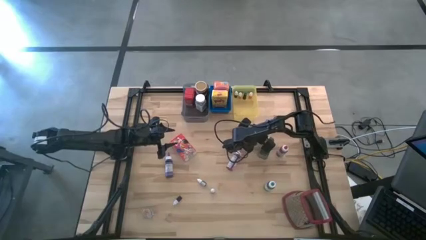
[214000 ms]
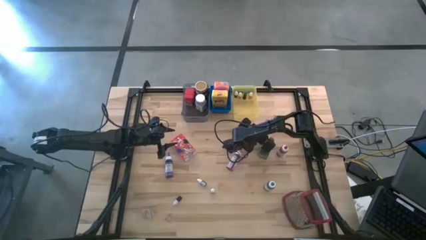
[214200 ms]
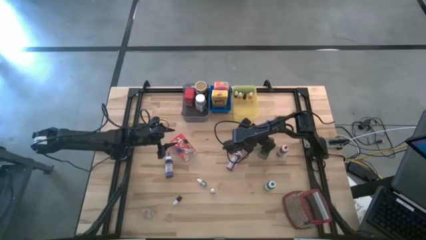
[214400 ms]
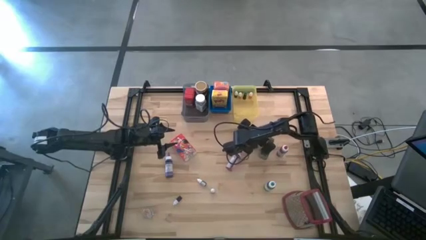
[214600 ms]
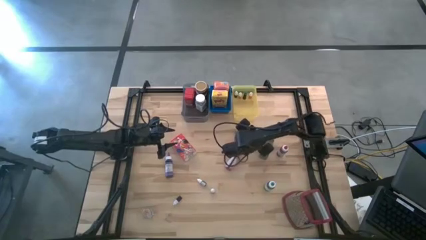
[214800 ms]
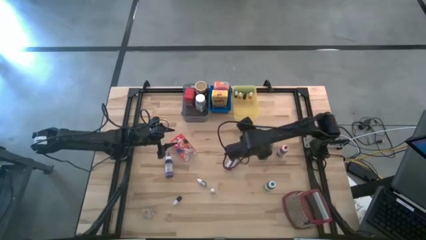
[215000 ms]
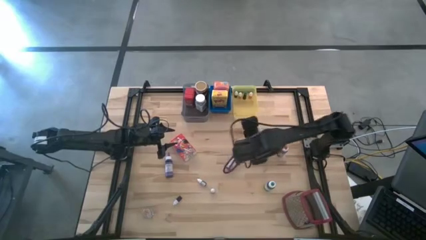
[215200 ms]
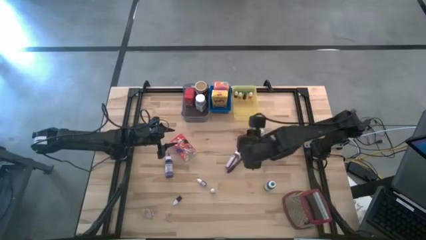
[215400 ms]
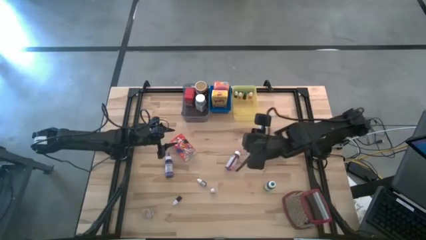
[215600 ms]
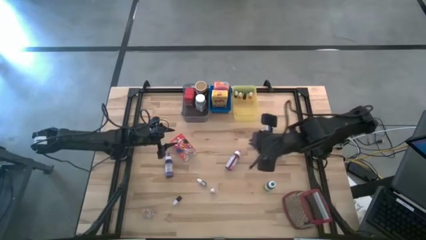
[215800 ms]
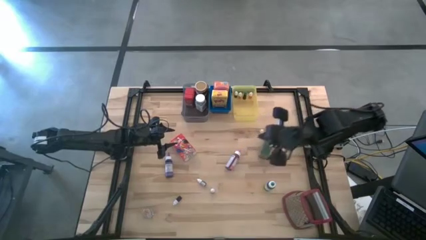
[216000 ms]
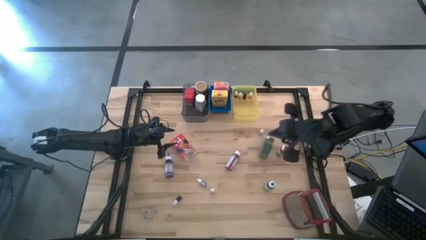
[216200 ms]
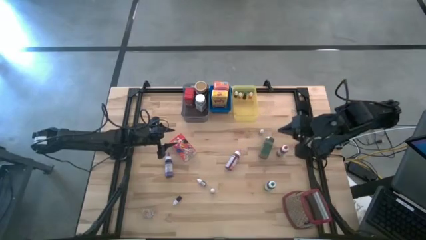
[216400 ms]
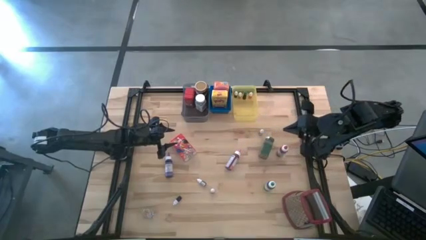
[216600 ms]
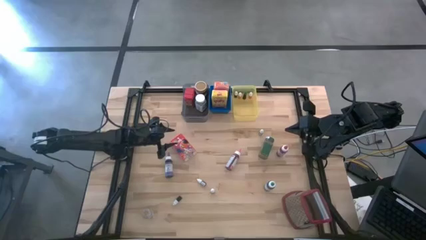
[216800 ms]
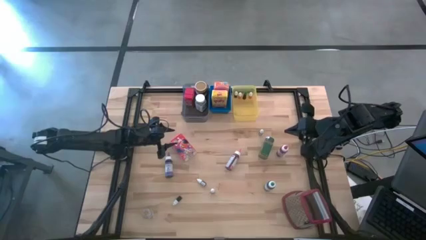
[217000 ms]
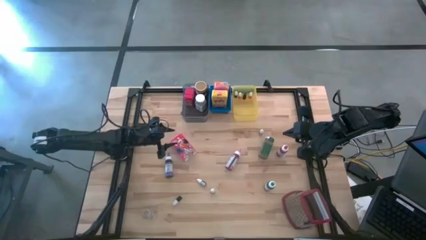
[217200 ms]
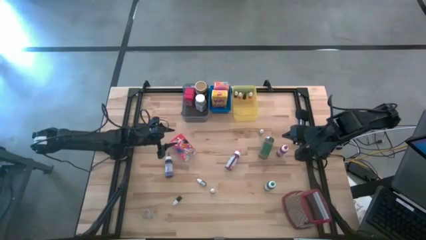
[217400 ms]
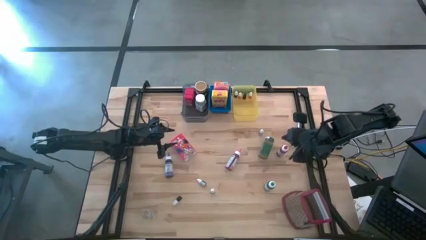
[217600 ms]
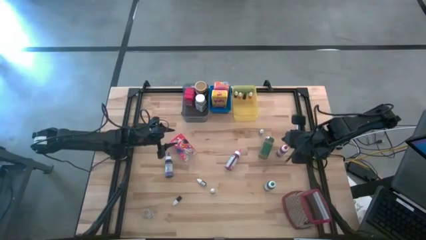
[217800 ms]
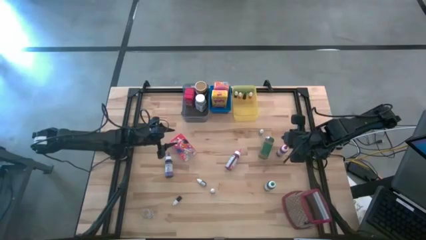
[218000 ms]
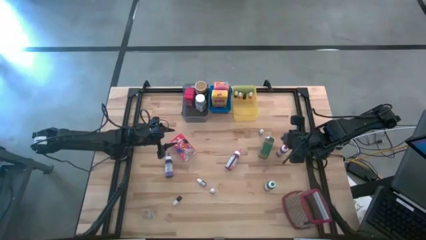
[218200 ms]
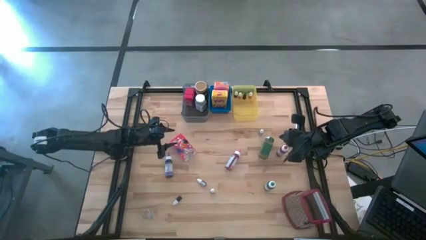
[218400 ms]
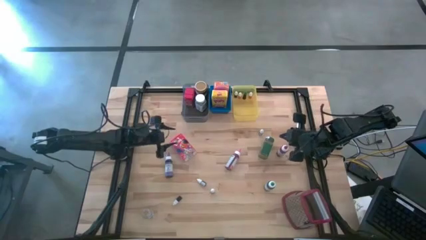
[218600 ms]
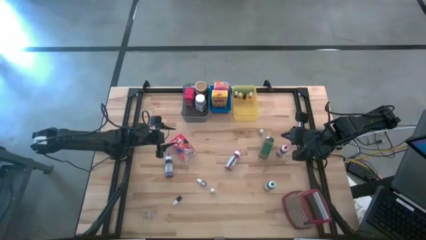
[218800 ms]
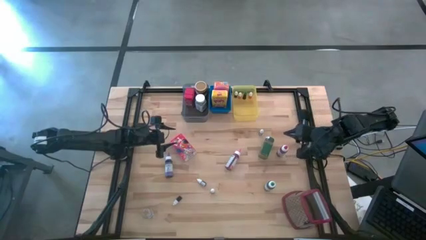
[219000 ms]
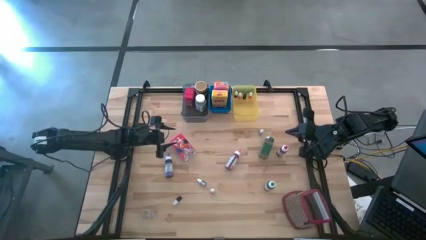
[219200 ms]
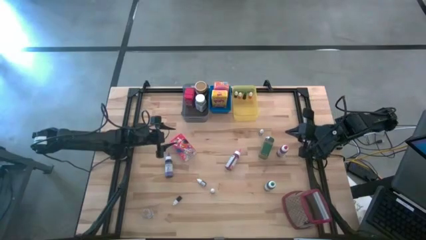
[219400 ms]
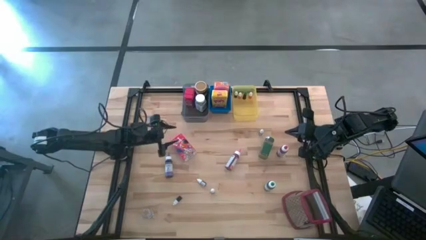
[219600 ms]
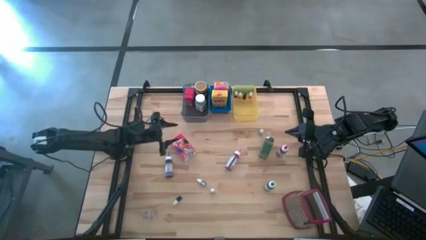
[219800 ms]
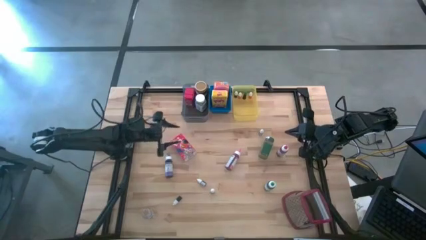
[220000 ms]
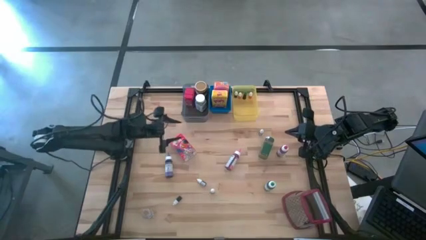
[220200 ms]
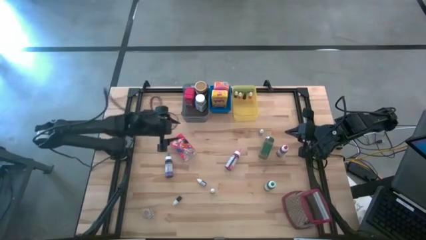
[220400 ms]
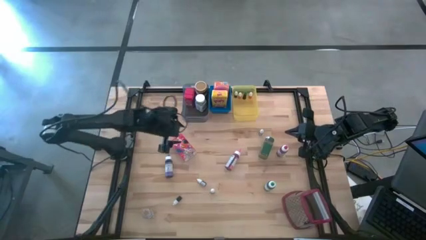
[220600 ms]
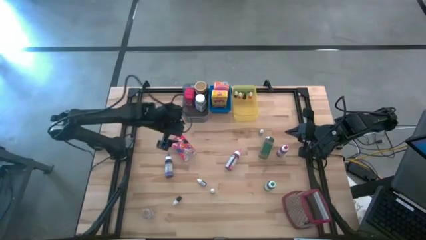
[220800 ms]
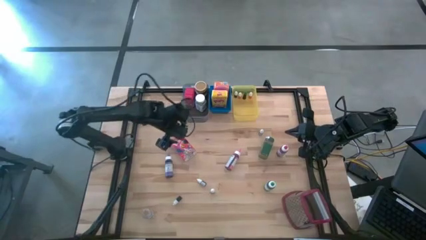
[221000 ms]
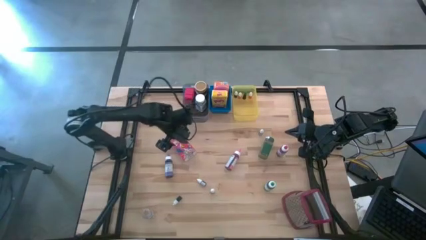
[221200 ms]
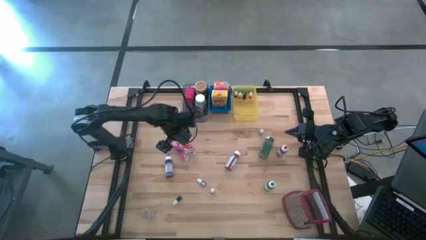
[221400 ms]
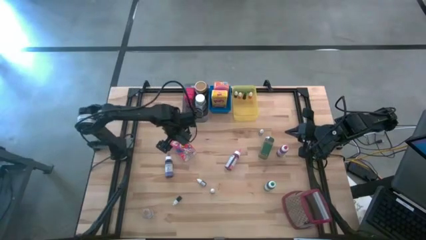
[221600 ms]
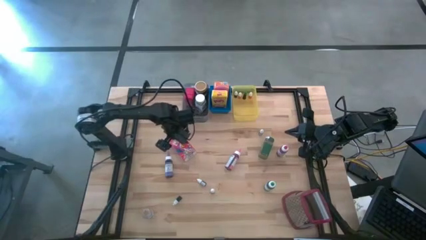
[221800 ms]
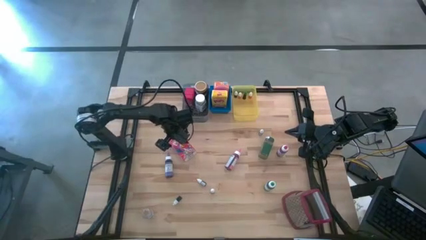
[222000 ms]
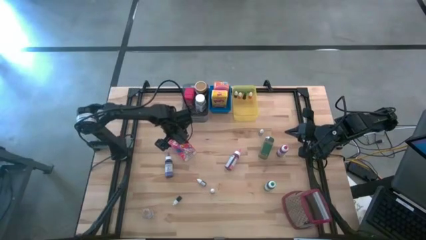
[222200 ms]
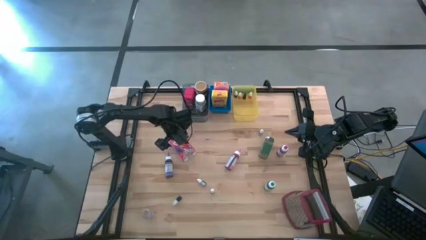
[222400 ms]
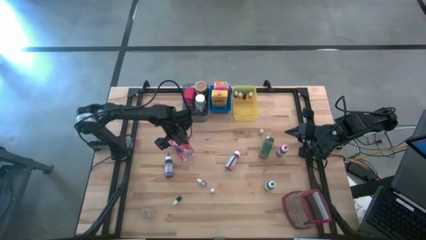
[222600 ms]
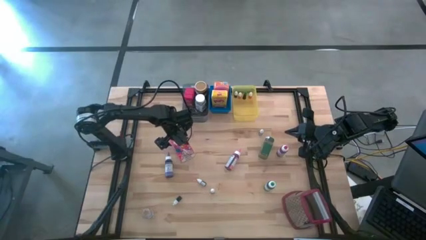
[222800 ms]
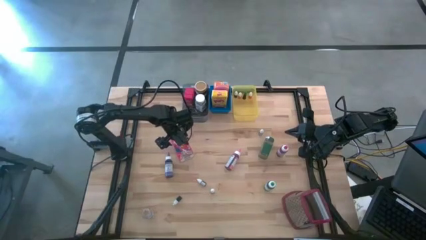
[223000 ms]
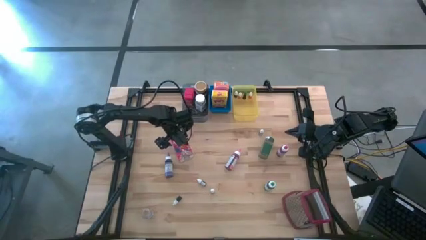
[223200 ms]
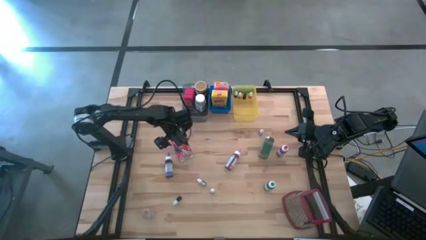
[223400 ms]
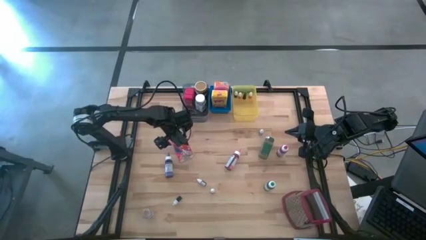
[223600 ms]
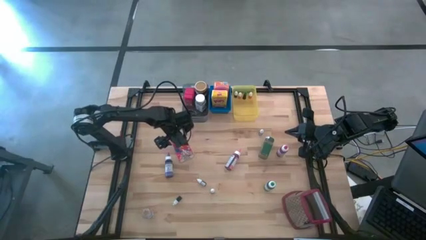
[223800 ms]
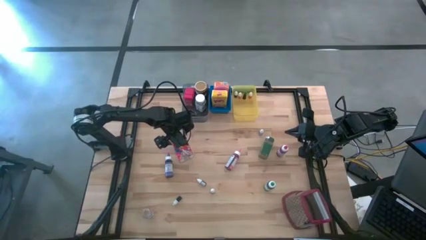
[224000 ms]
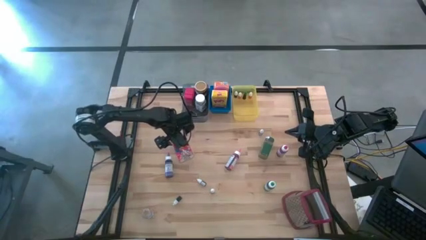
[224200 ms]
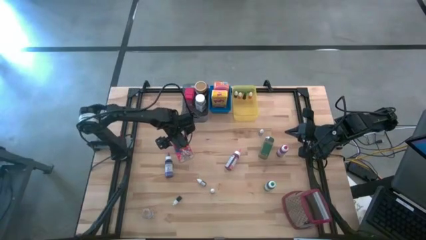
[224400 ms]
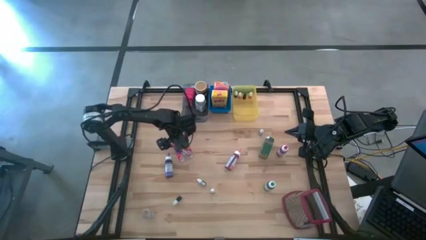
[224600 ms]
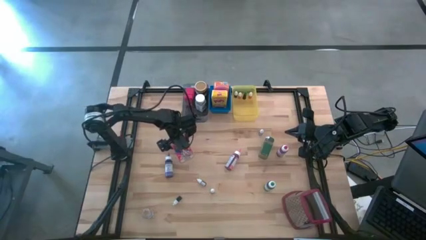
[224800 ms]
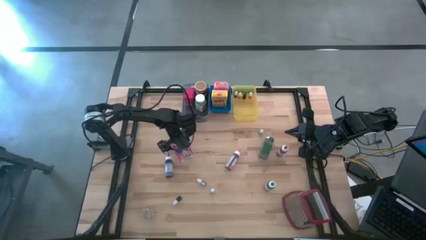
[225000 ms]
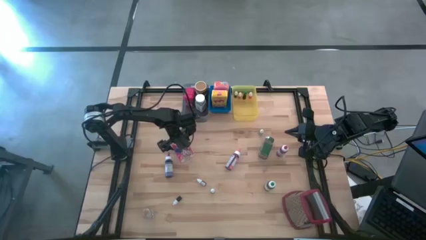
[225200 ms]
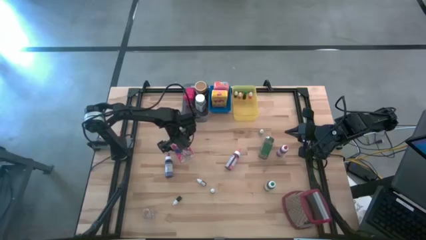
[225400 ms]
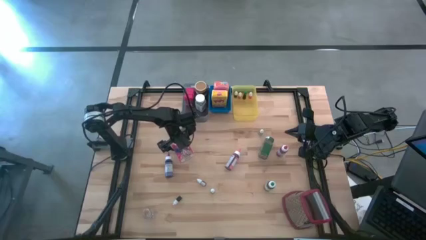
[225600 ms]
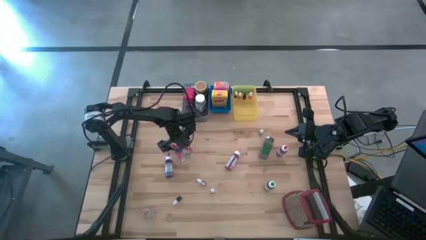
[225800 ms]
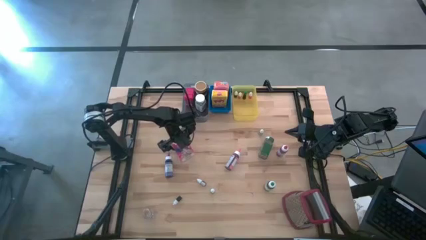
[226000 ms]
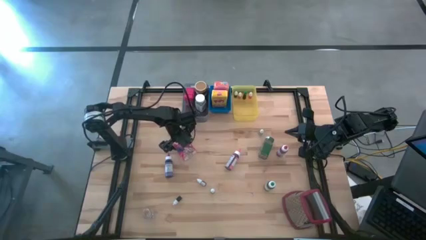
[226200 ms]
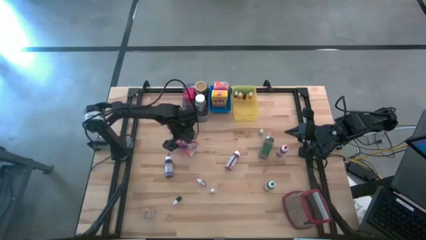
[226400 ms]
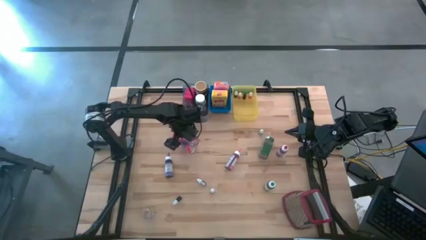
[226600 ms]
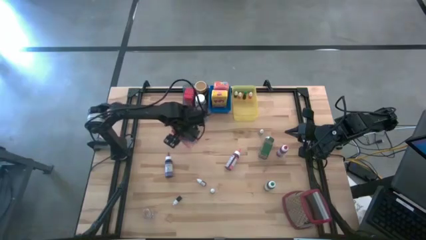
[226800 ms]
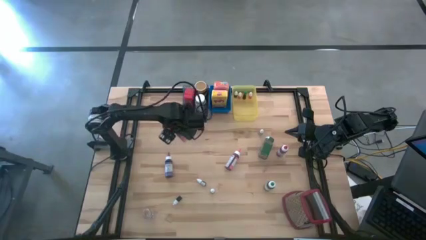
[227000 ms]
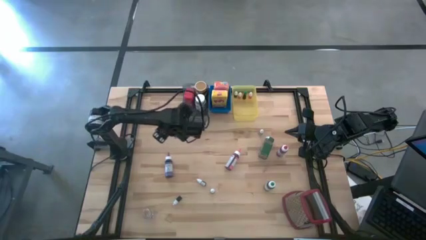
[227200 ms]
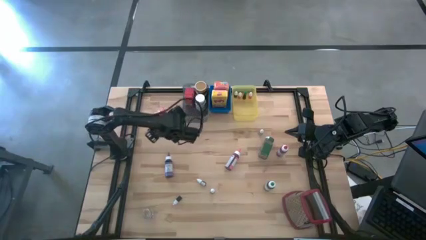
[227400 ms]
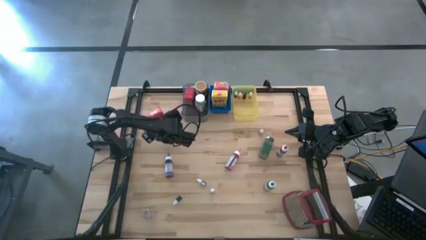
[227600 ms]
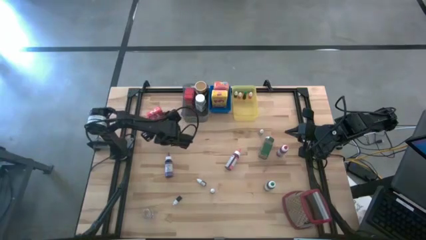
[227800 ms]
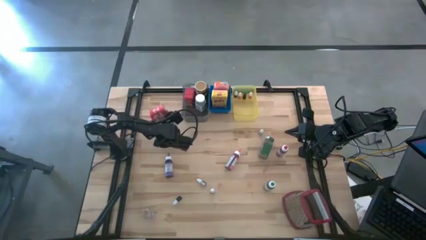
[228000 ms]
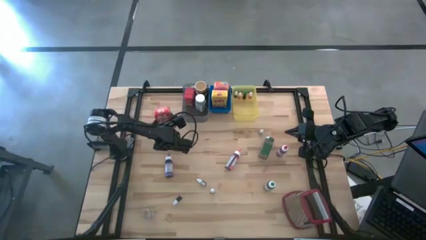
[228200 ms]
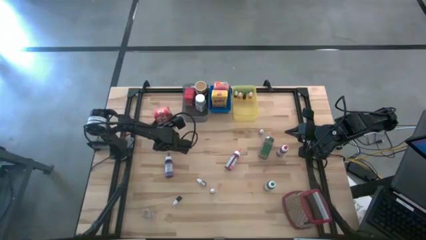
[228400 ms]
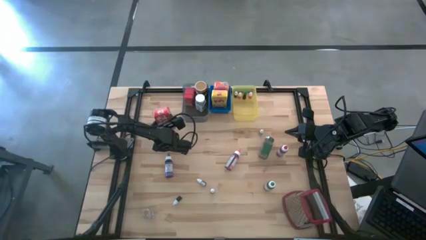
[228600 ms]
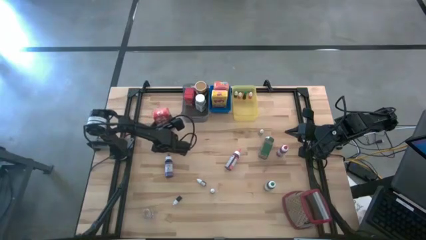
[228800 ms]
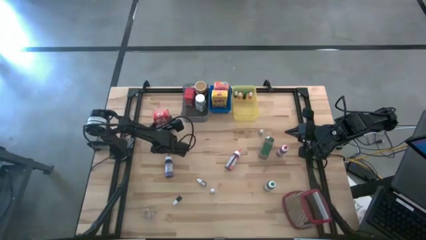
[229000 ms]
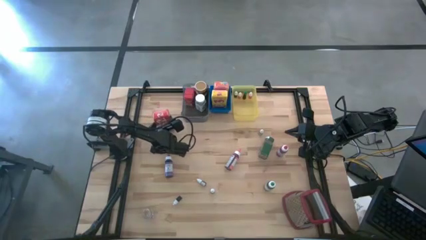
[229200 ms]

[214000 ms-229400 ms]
Task: Pick & Place Kitchen Items
Put the red cereal box into the blue bin

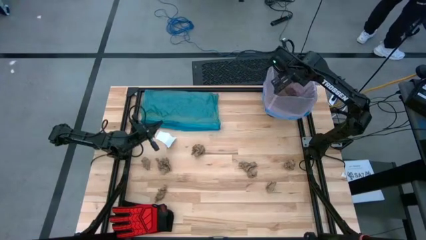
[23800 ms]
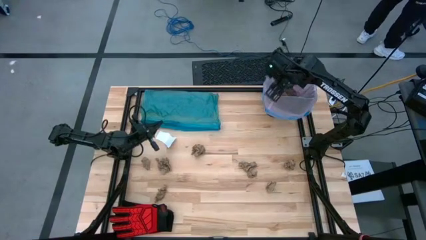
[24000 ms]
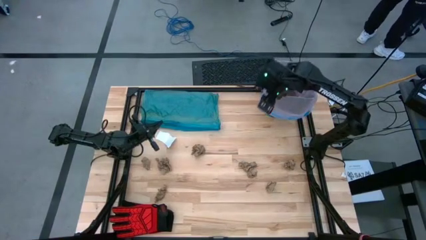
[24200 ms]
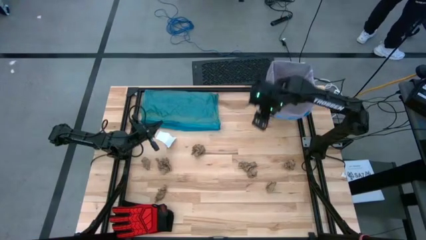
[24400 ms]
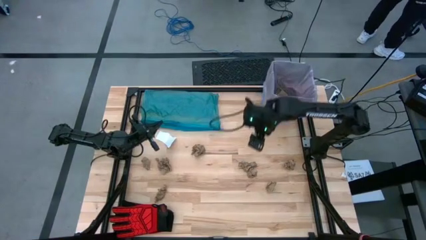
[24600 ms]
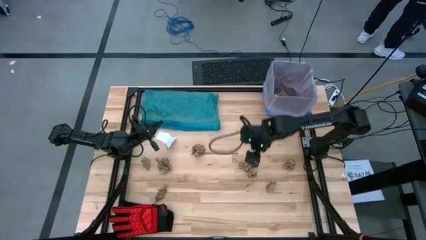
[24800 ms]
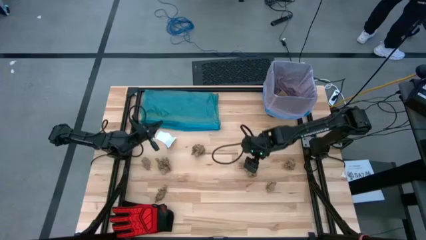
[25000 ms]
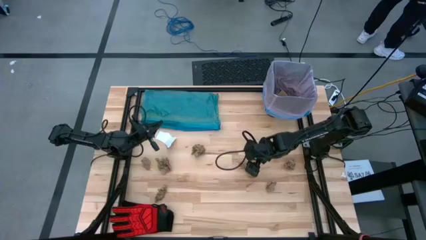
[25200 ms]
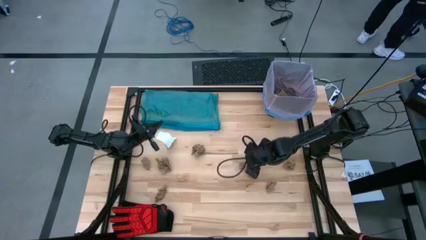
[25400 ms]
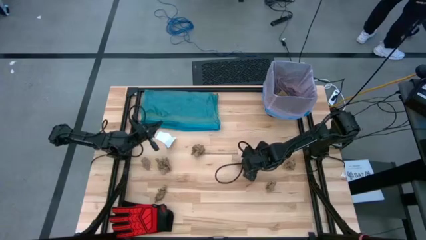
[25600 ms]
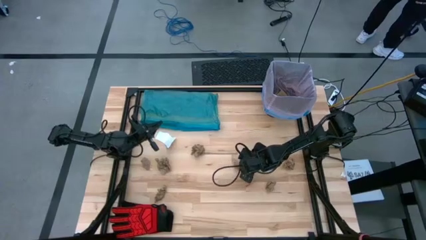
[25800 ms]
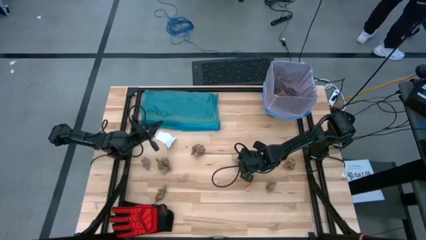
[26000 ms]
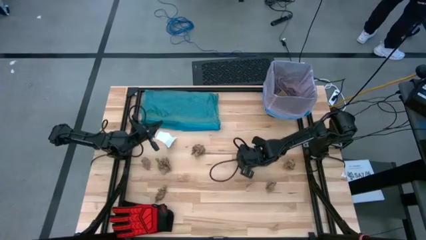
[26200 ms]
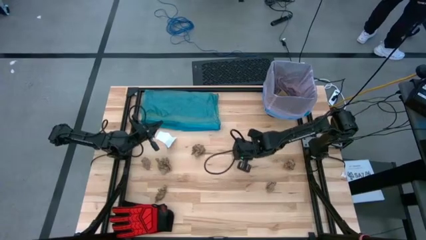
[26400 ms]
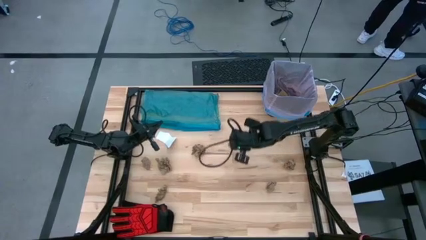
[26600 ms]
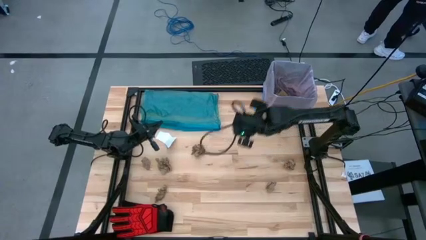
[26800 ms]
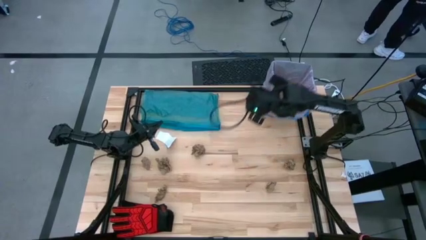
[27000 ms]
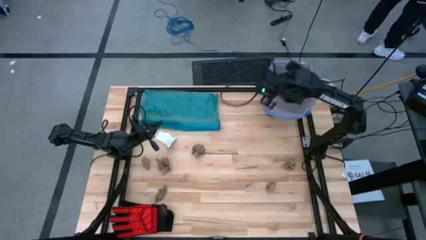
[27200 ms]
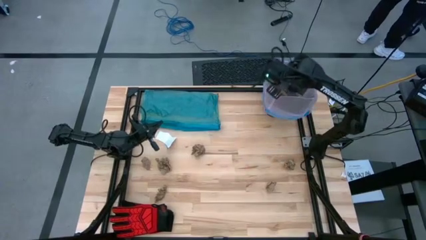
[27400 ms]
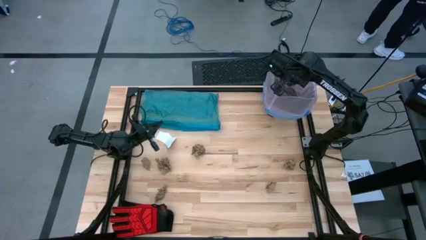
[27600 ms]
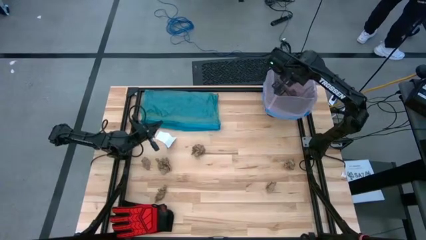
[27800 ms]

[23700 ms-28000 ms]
Task: place trash/remove bag and relplace
Put the brown napkin into the trash bin
